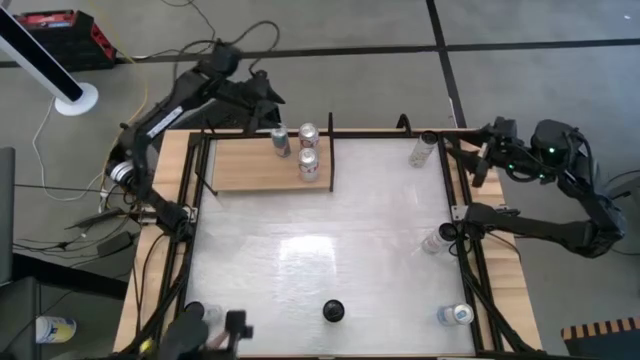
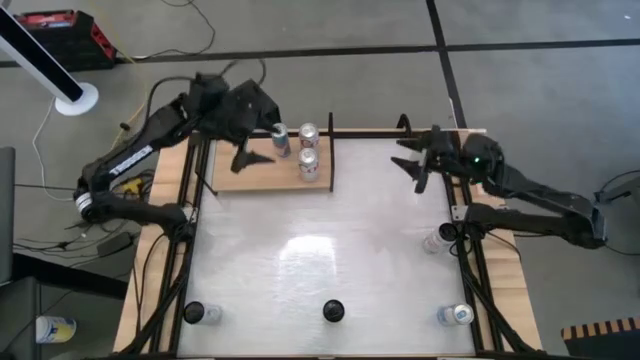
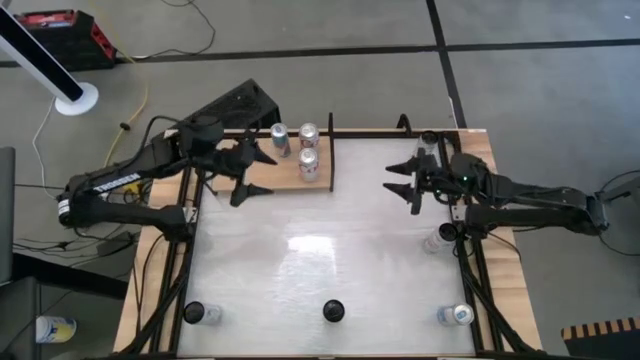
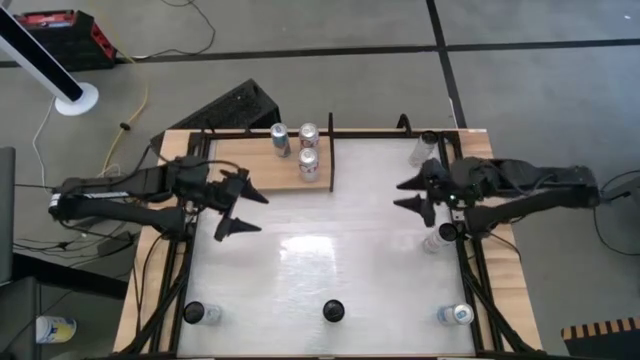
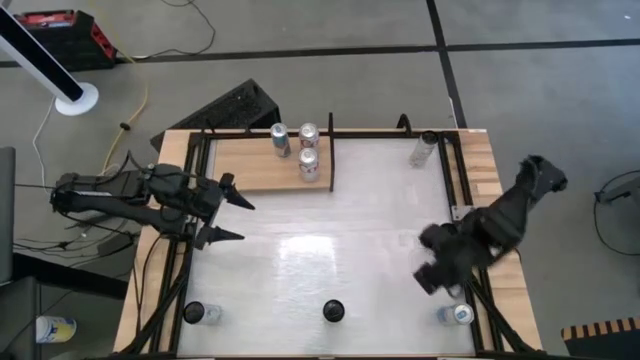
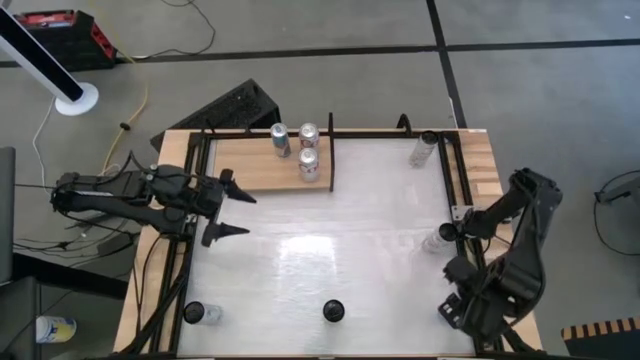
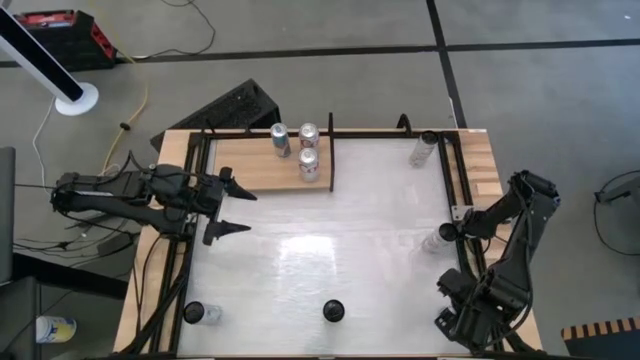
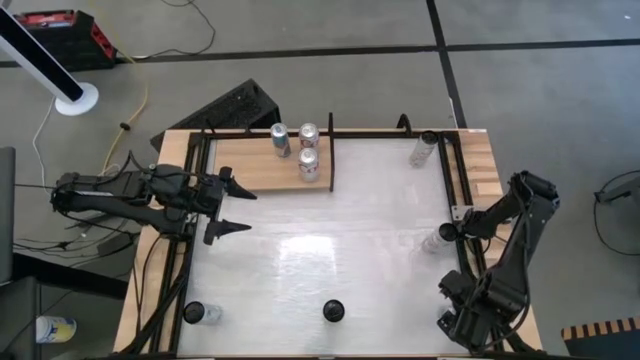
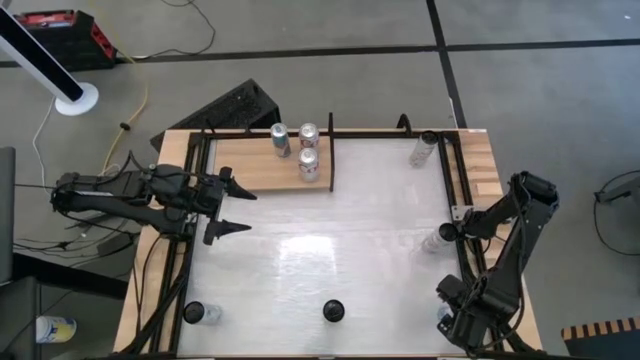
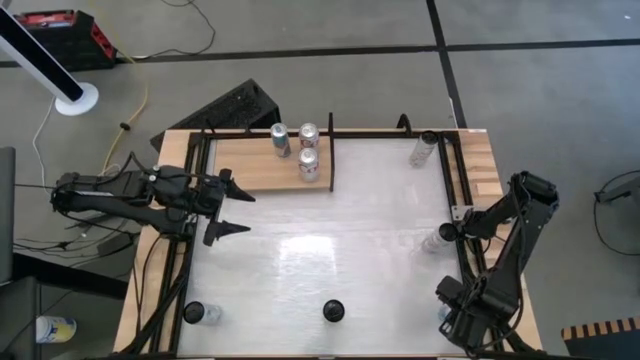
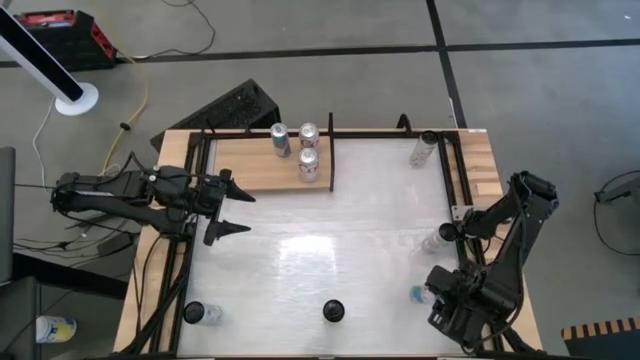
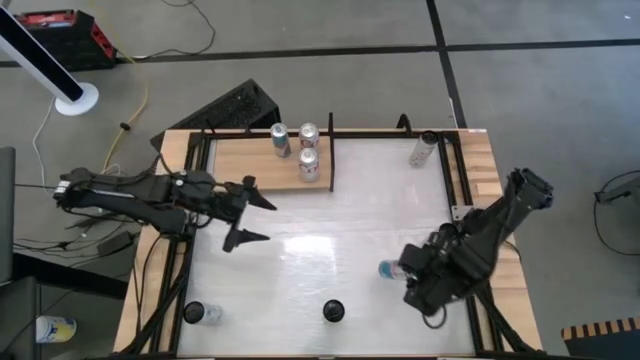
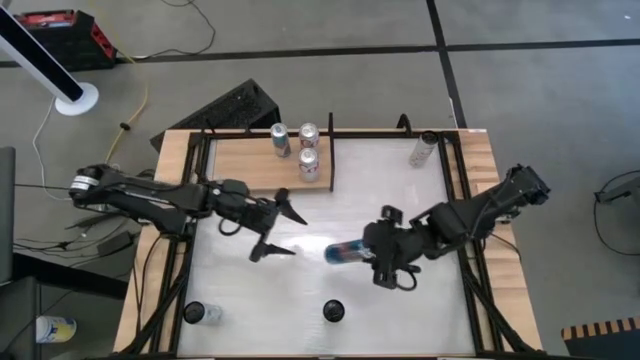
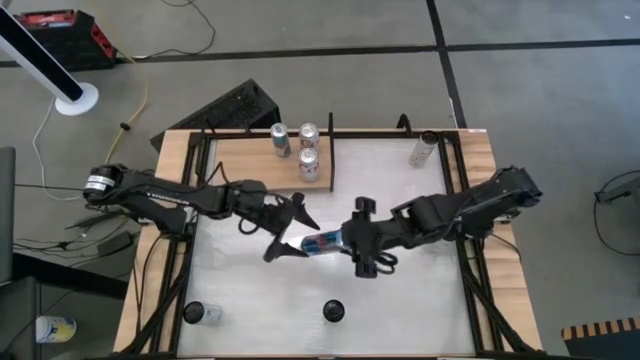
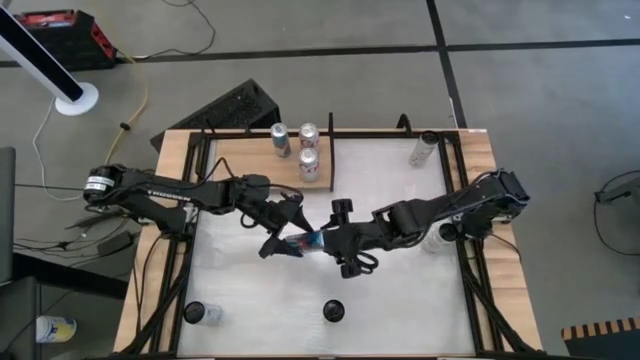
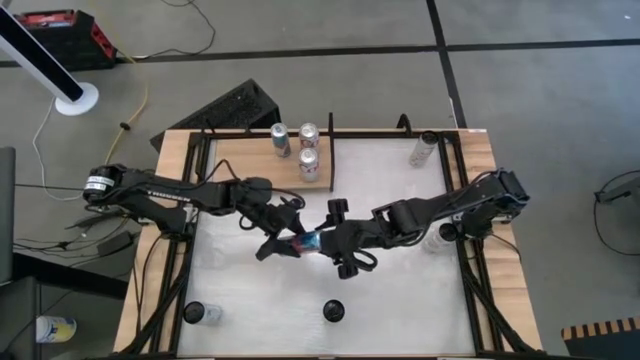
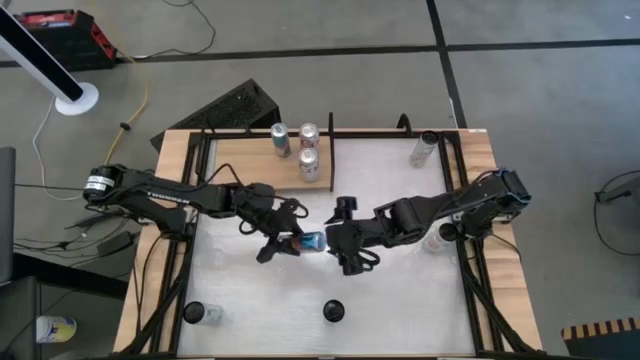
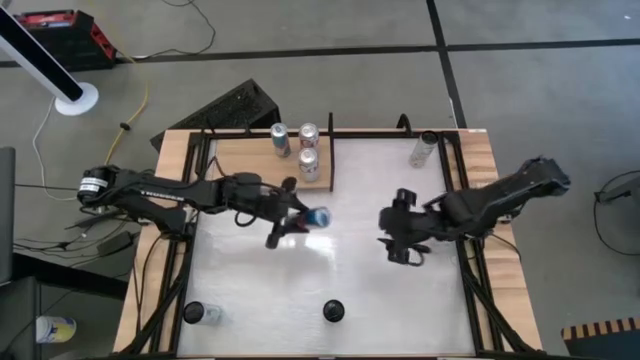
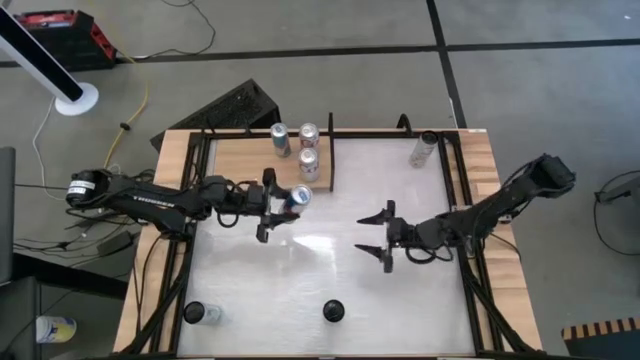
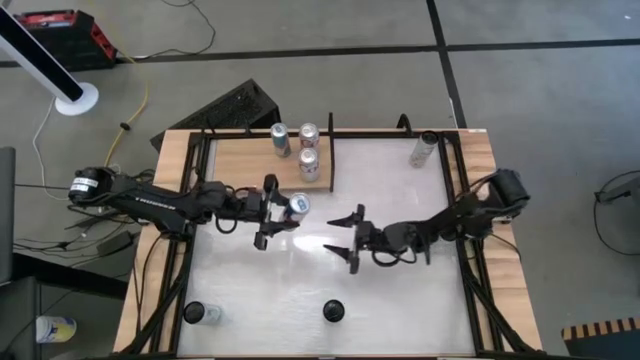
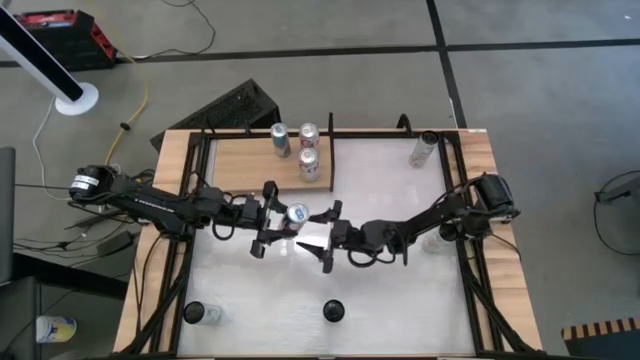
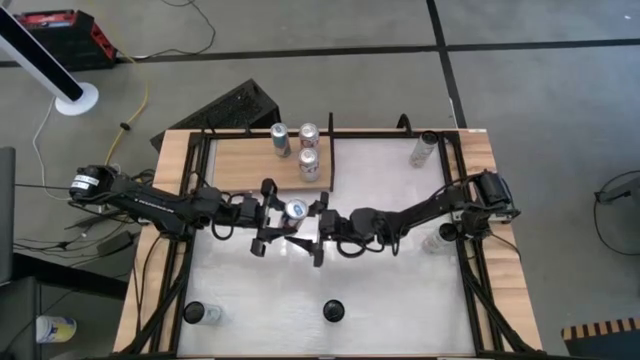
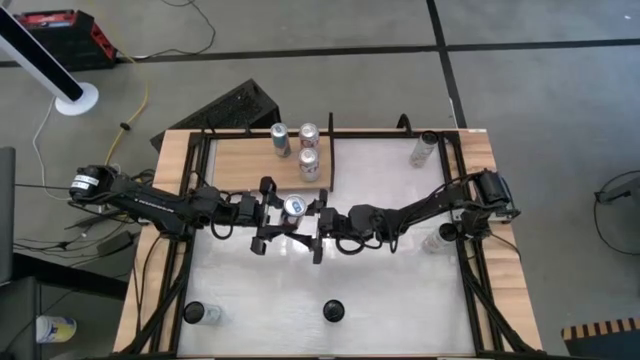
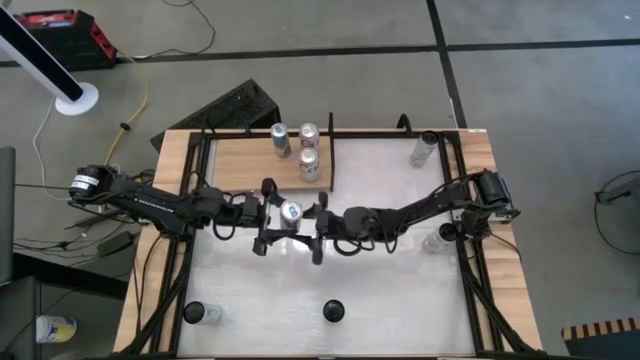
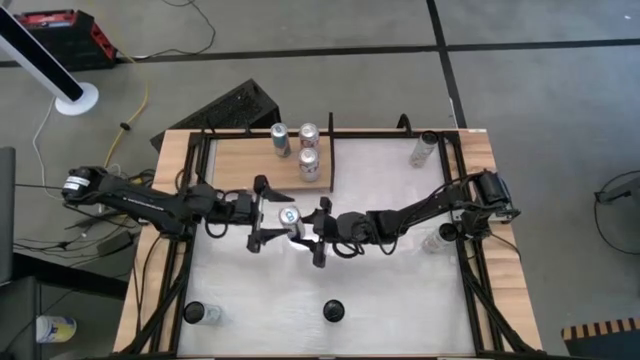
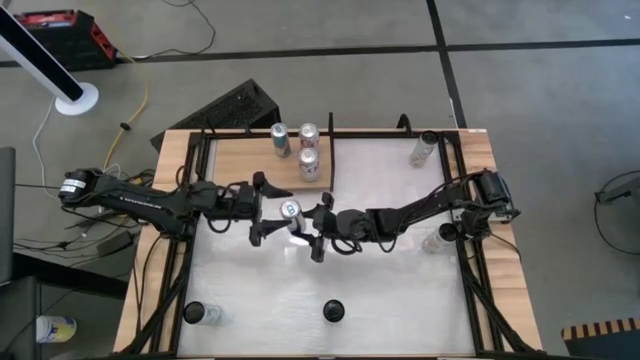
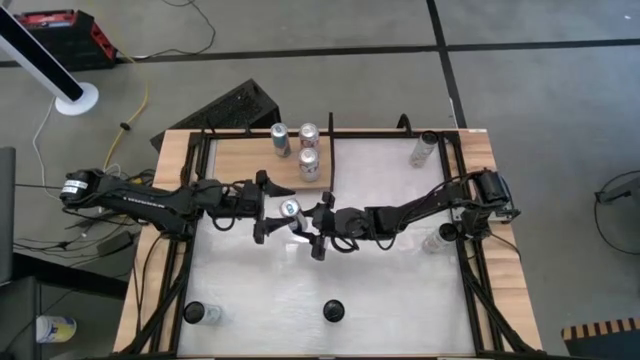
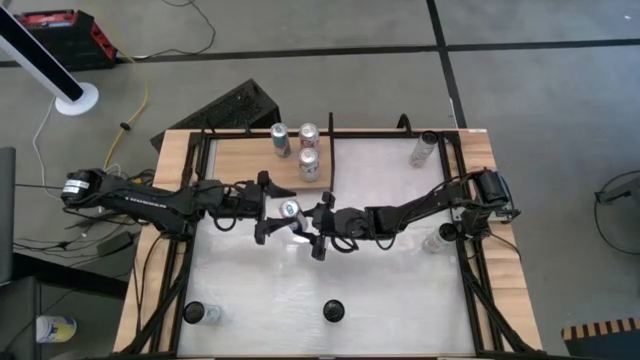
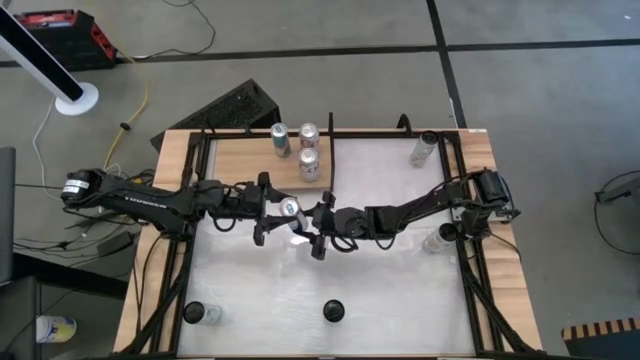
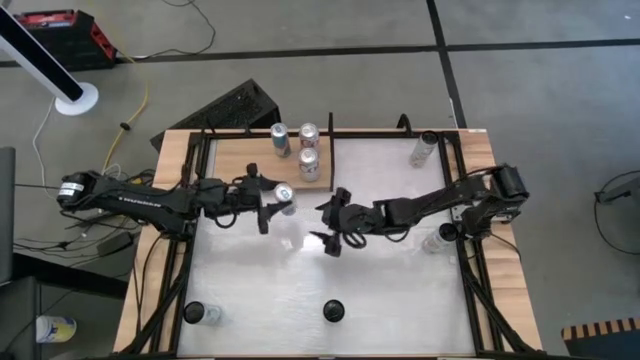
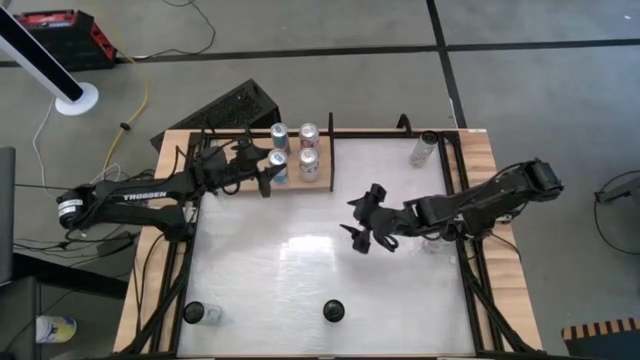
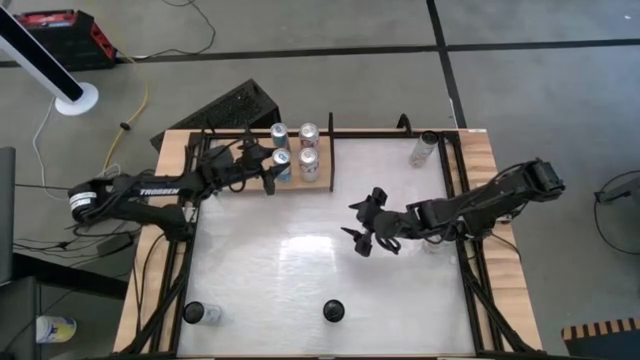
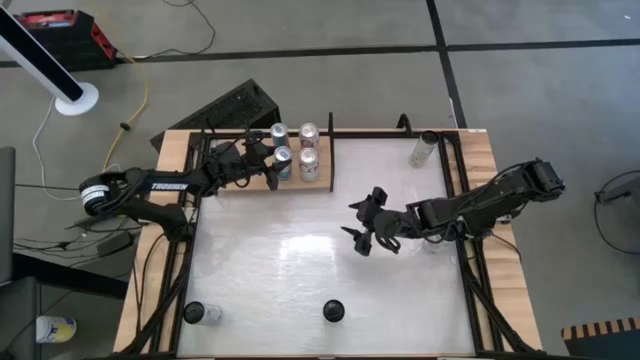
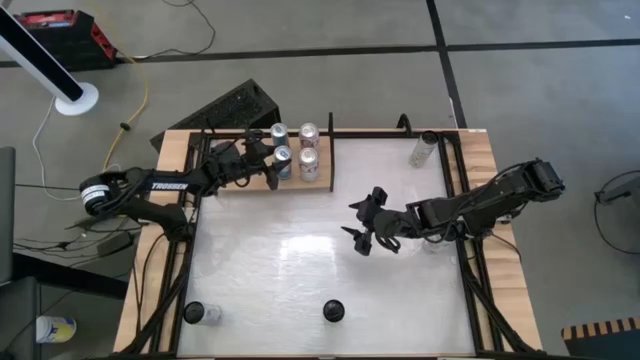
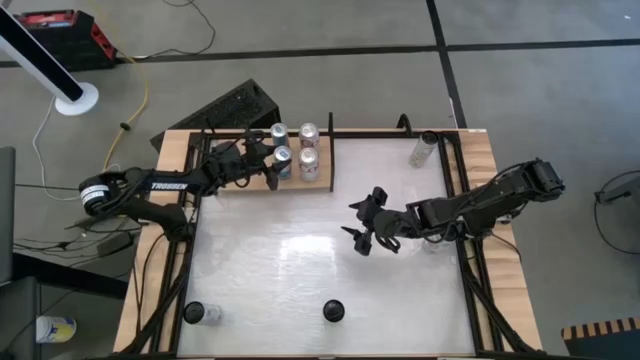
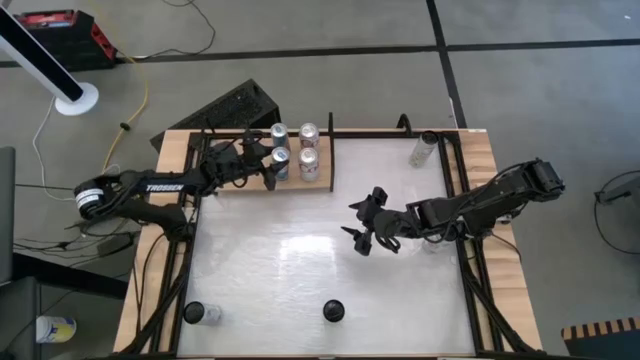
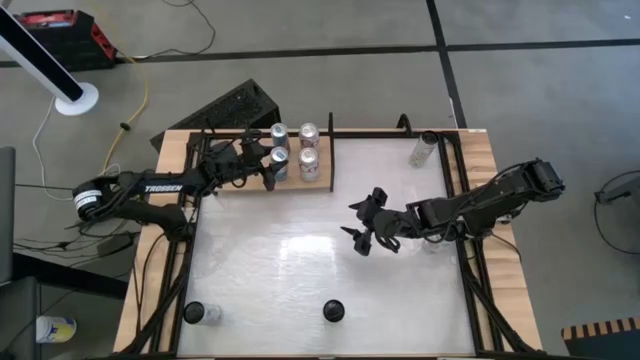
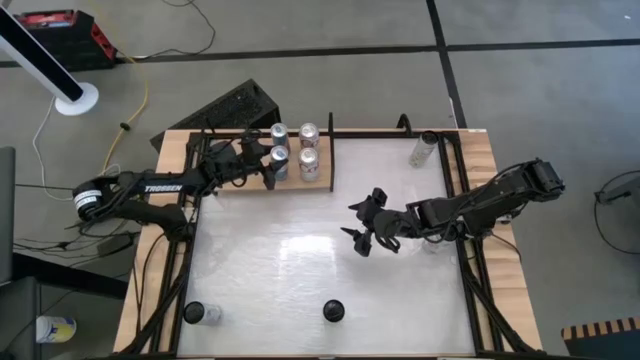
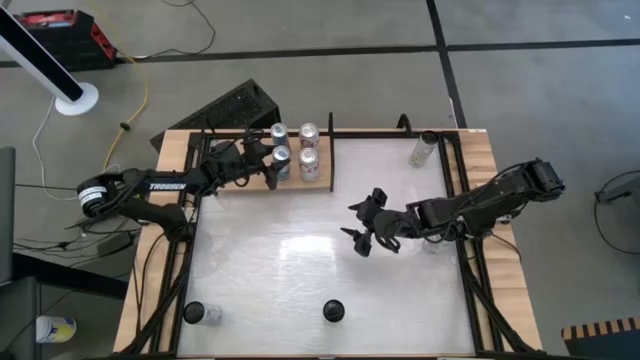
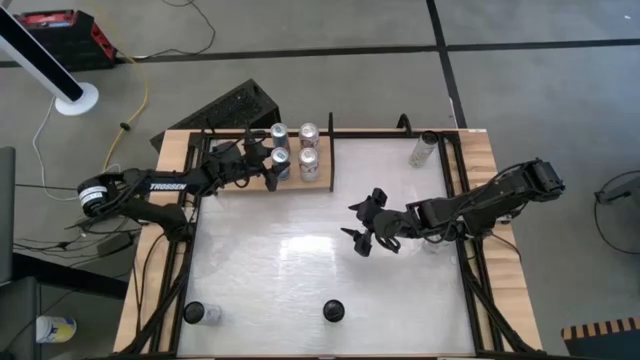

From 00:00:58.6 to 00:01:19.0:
Task: Place canned beverage on shelf
Put the blue soda can on the shelf
